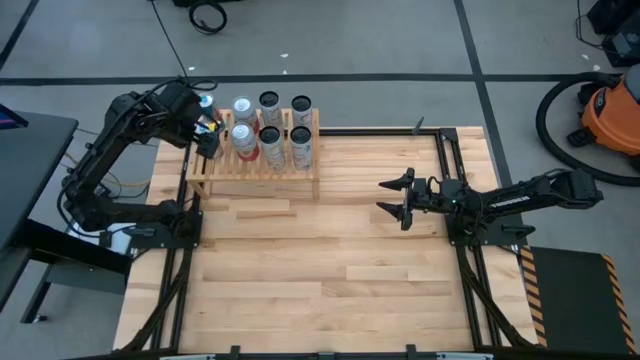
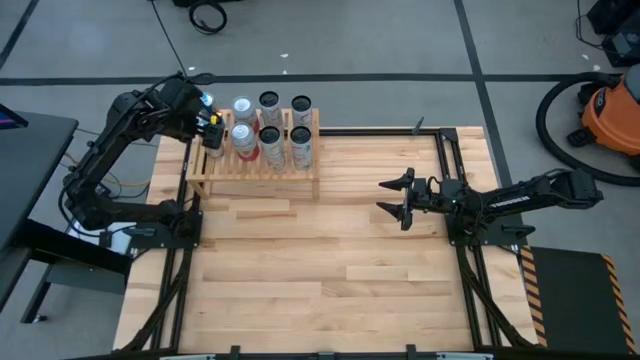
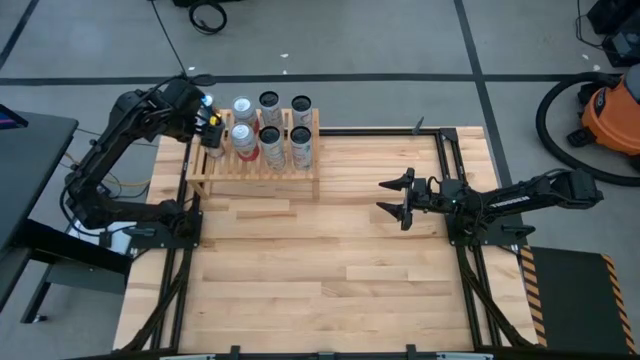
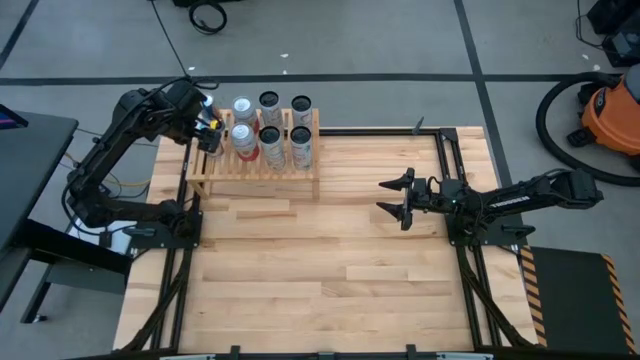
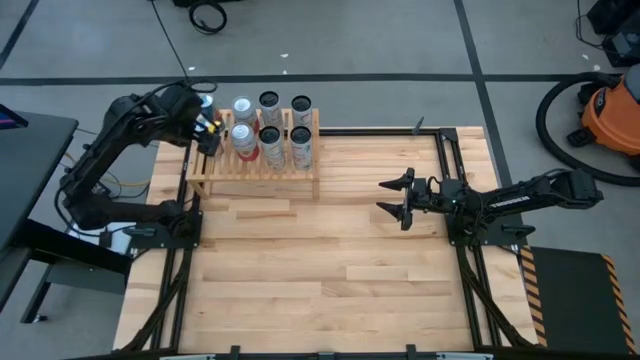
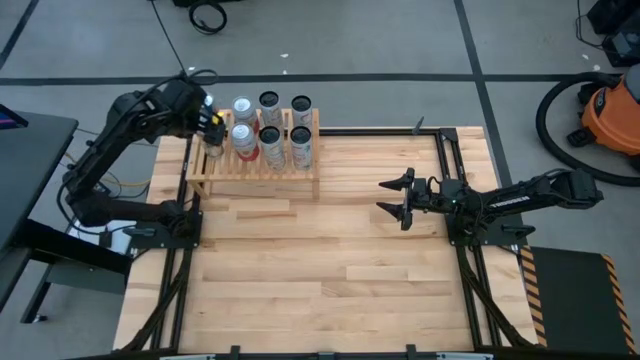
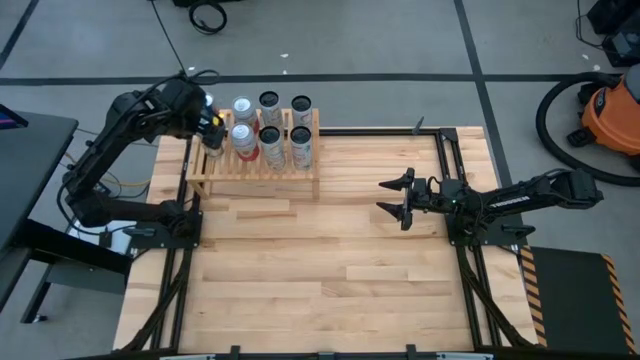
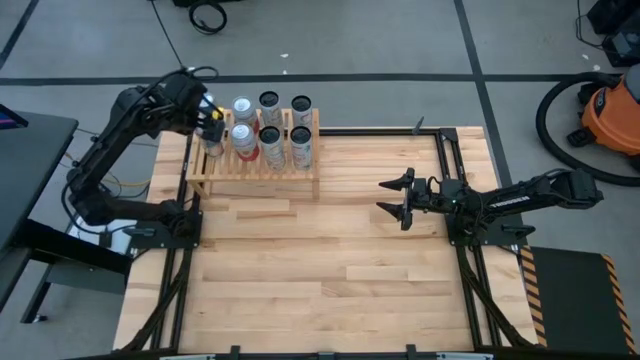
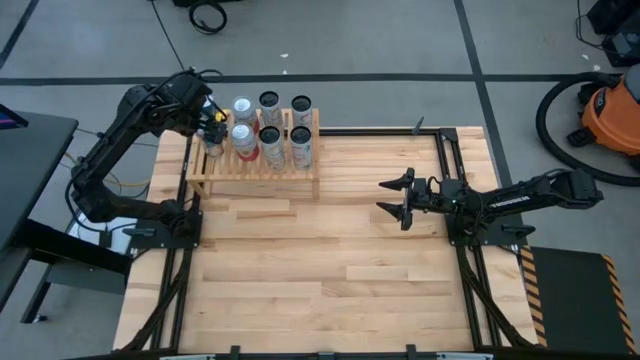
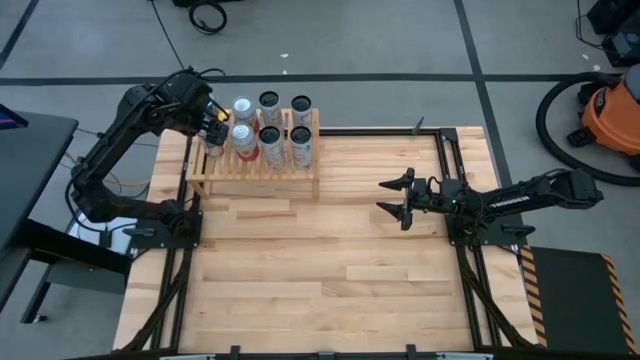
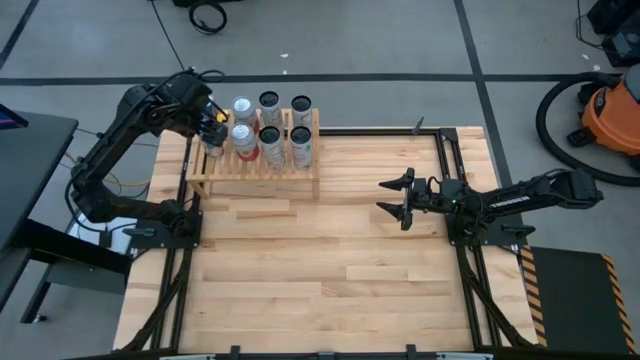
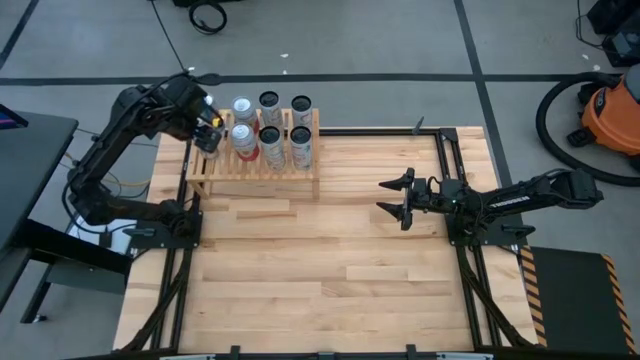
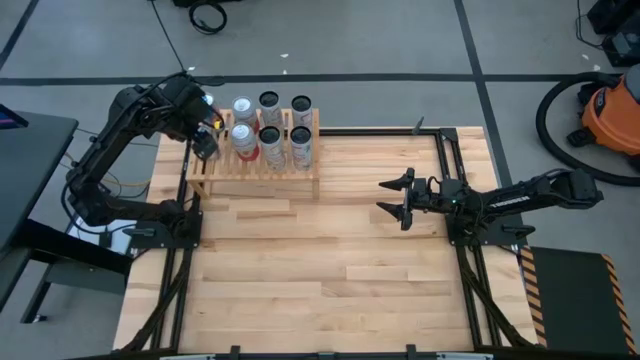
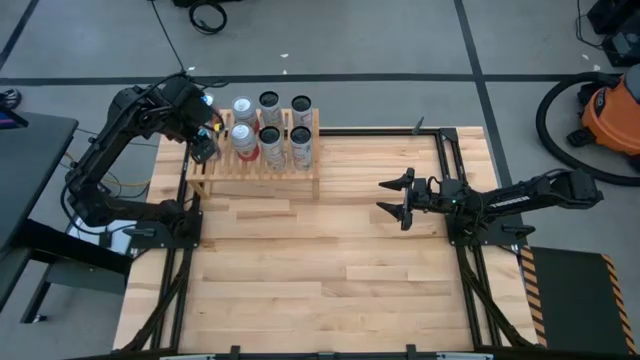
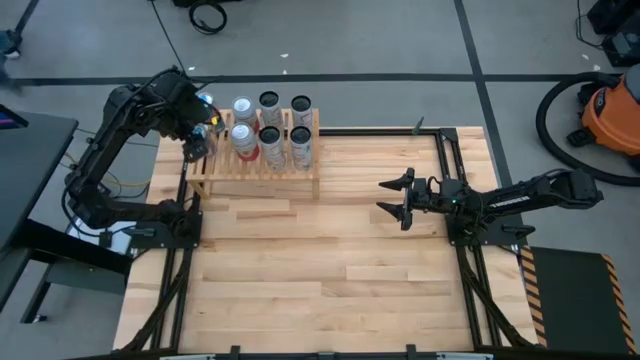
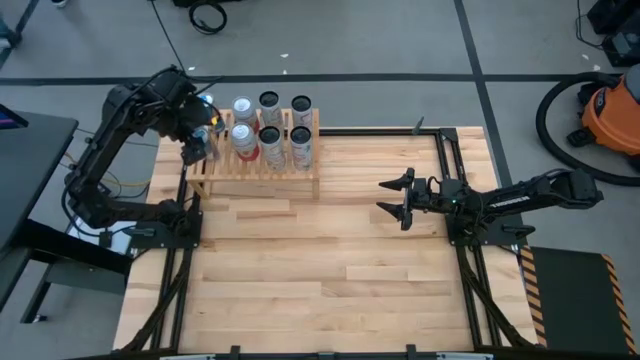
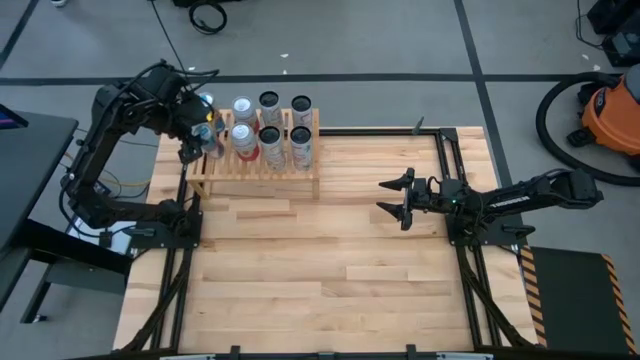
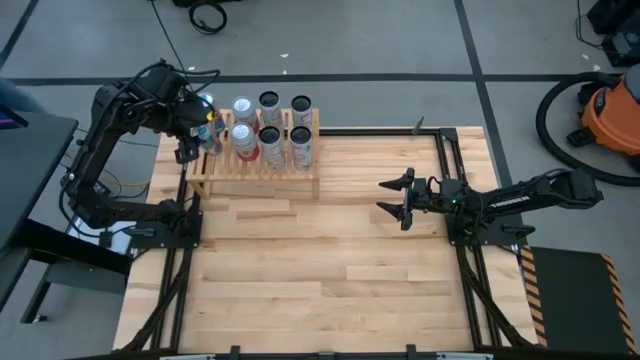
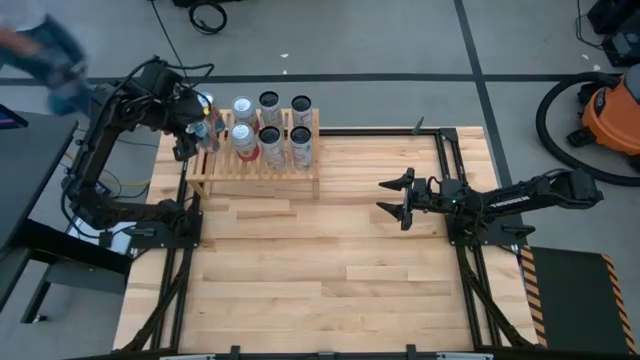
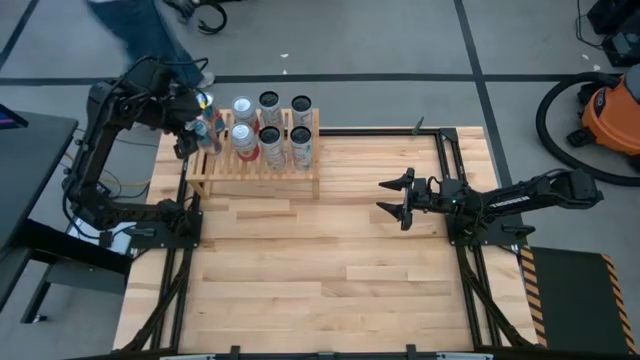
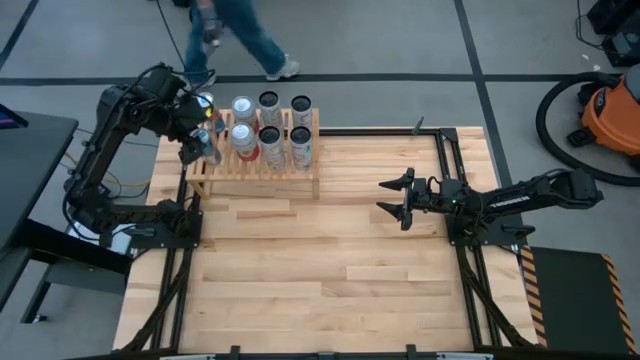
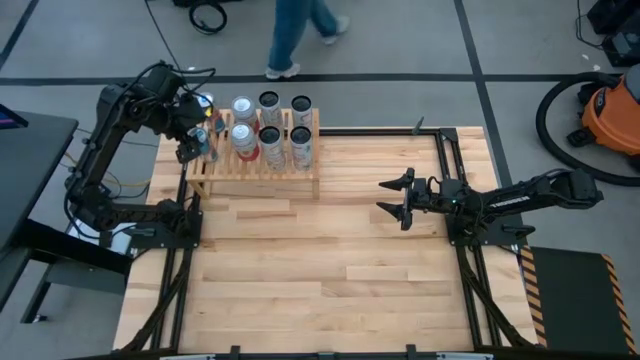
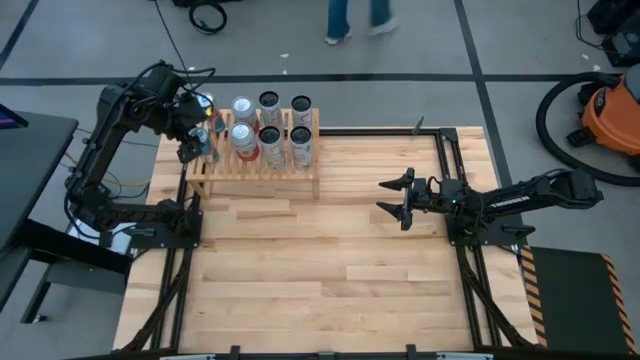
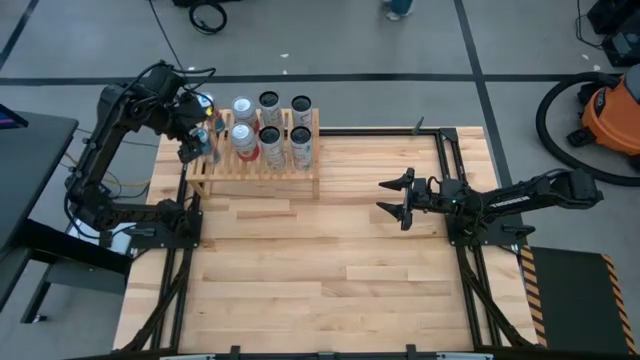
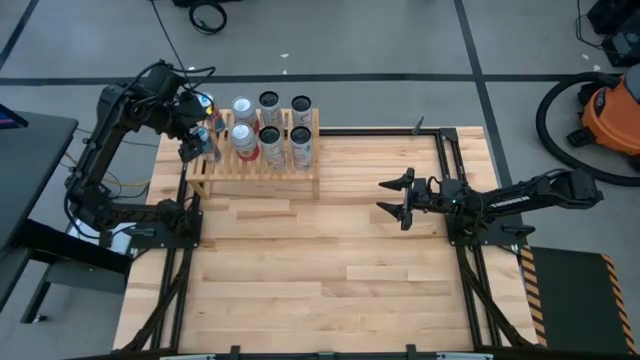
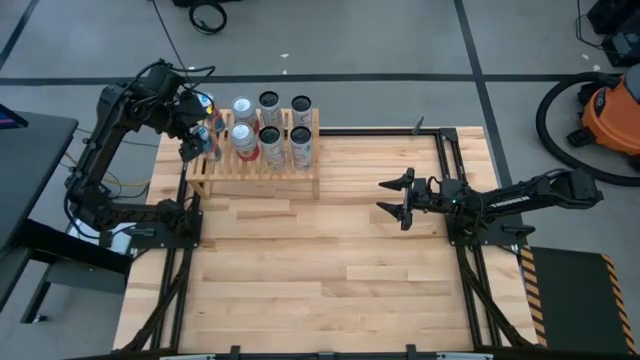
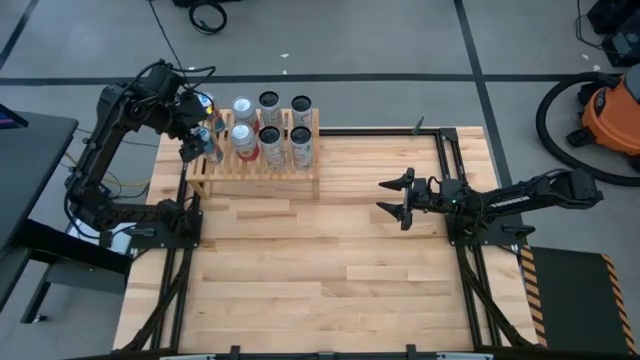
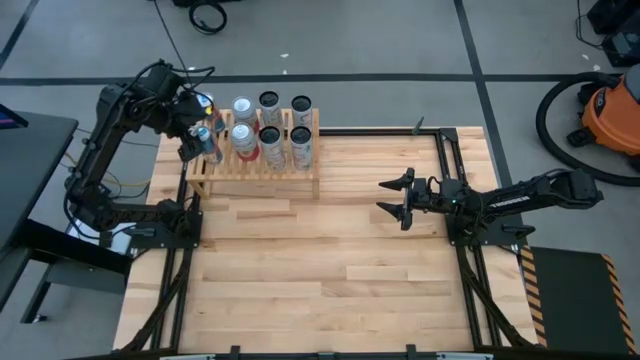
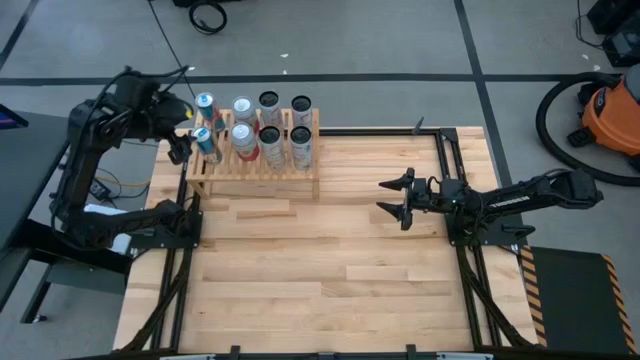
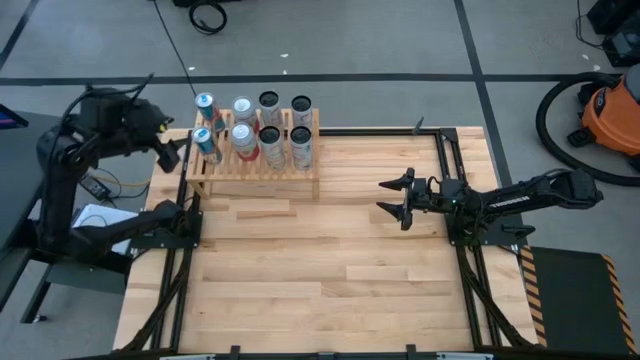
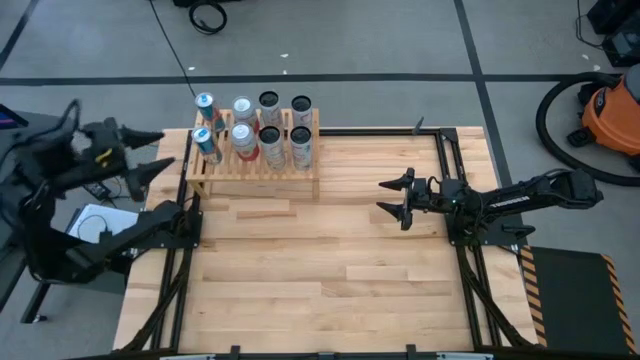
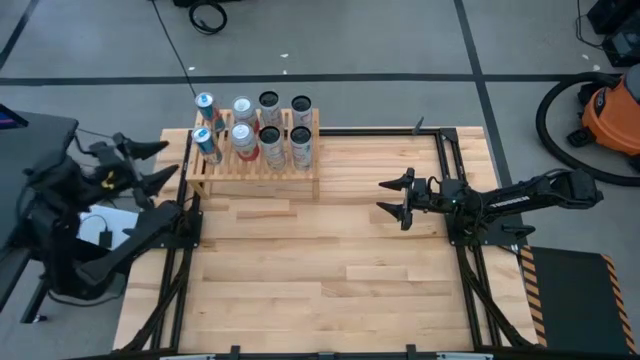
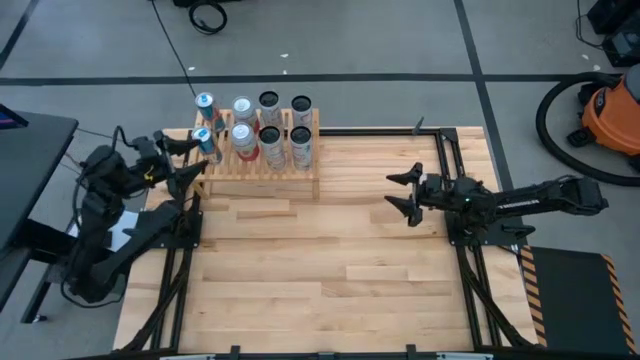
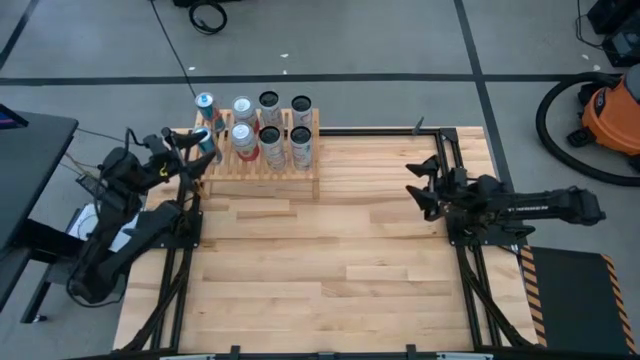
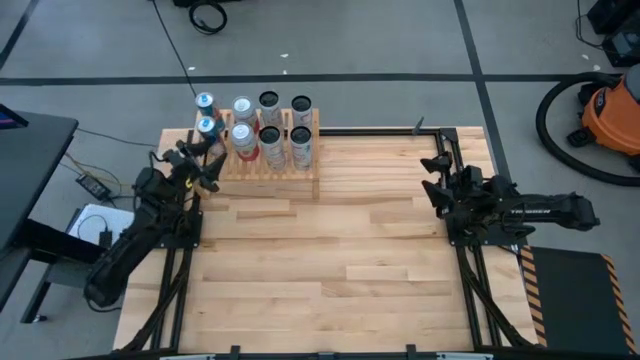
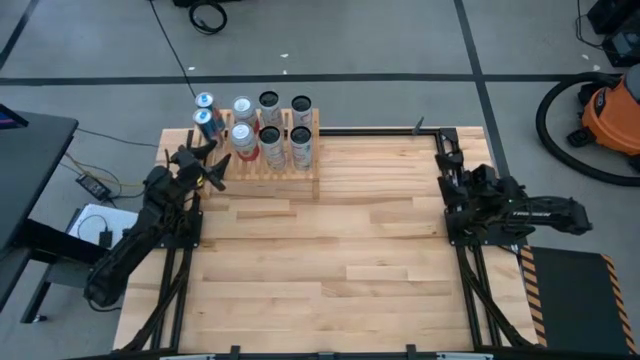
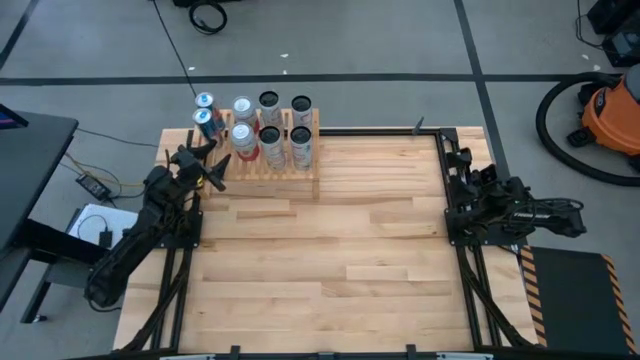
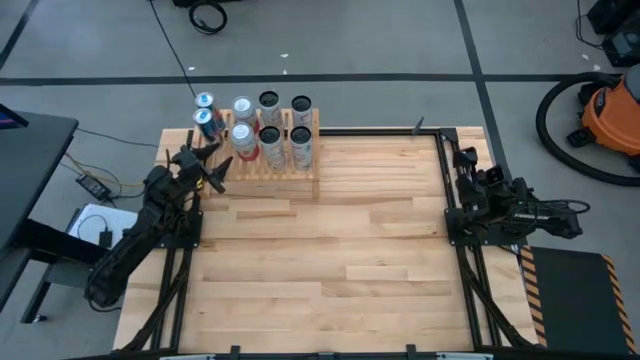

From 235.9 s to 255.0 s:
Task: Place canned beverage on shelf
Adjust the blue soda can

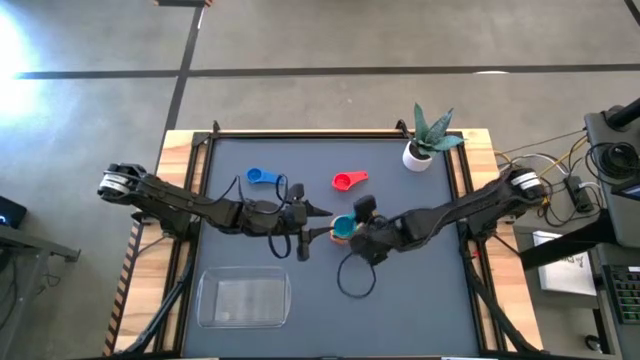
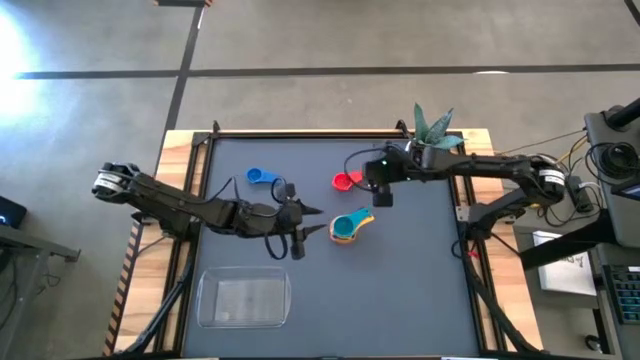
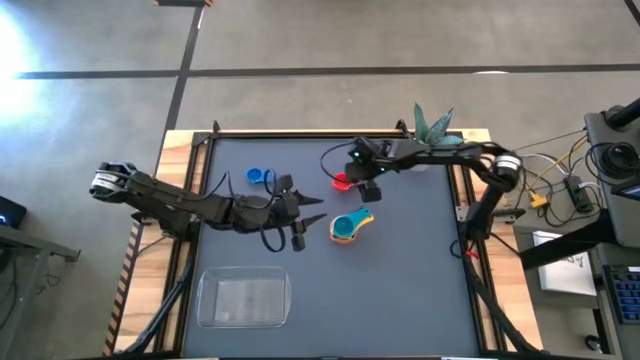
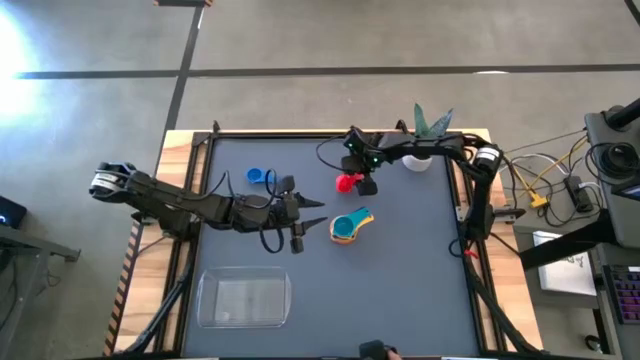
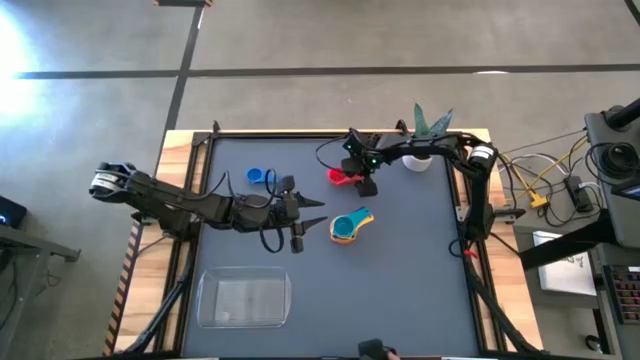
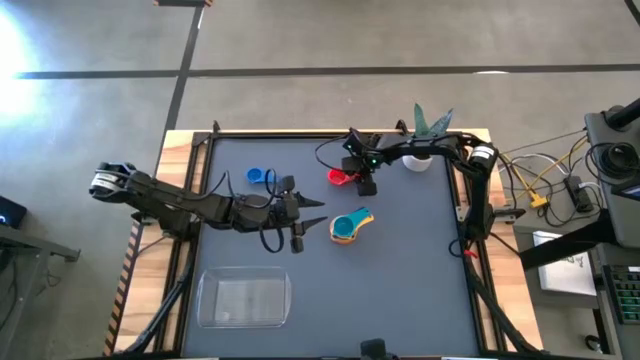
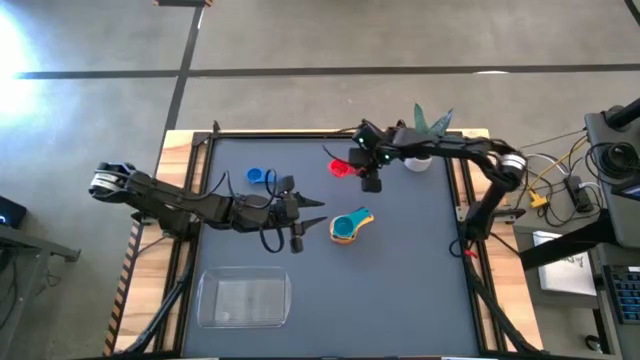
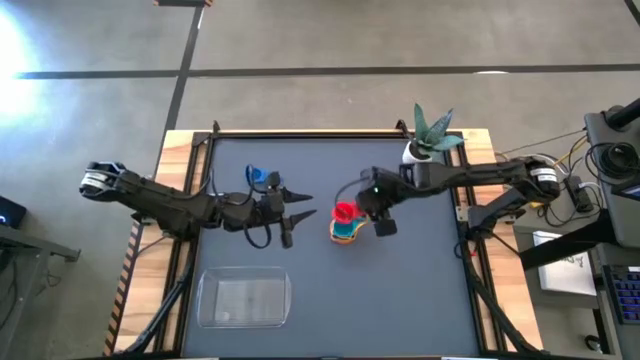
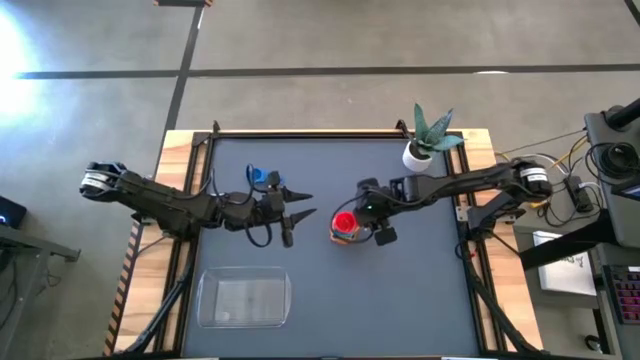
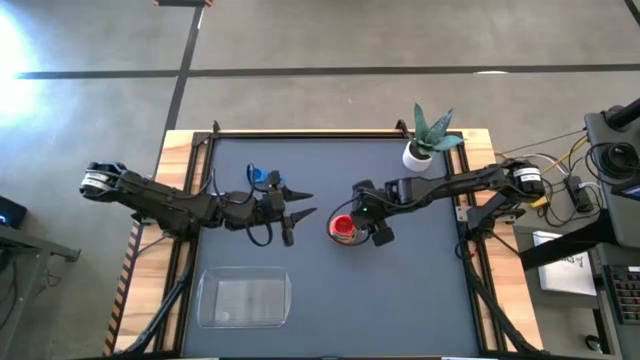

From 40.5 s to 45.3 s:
Task: Nest measuring cups in basket
Stack the red measuring cup on top of the light blue measuring cup
